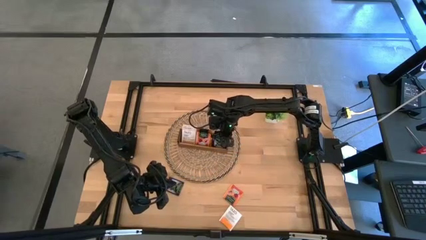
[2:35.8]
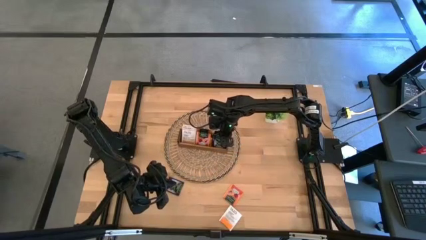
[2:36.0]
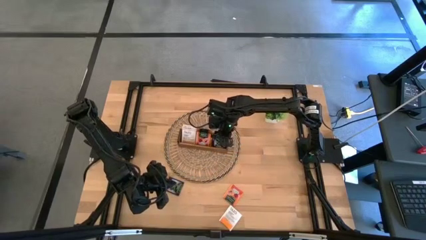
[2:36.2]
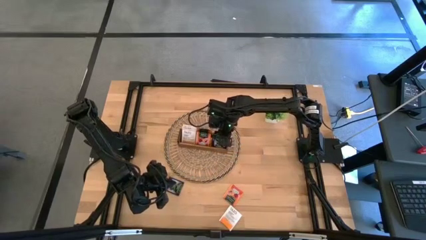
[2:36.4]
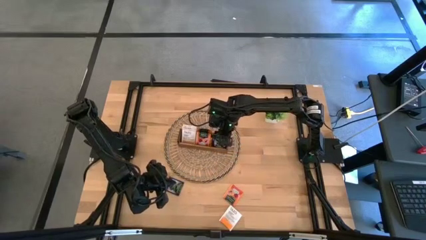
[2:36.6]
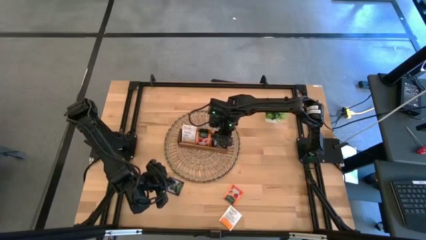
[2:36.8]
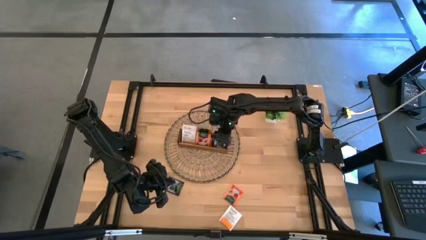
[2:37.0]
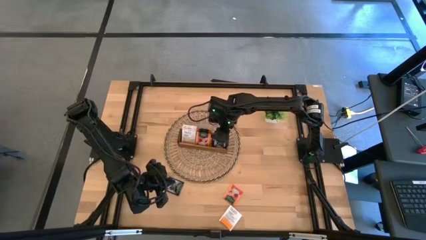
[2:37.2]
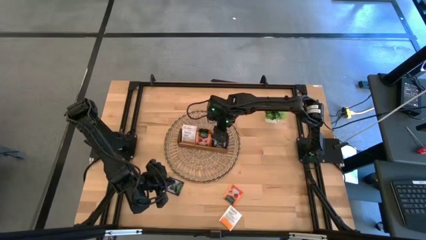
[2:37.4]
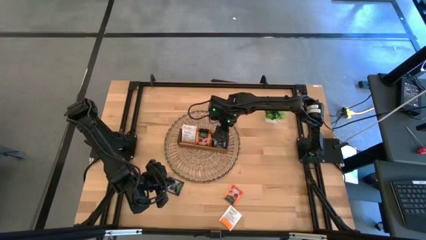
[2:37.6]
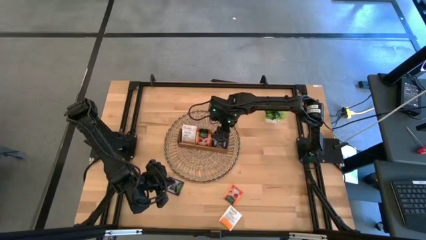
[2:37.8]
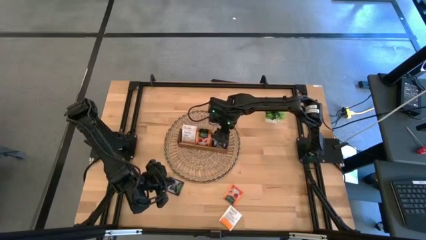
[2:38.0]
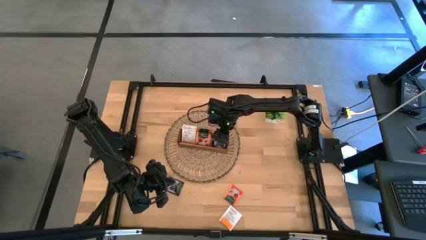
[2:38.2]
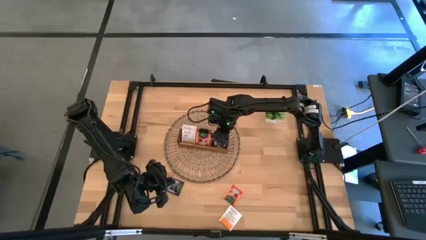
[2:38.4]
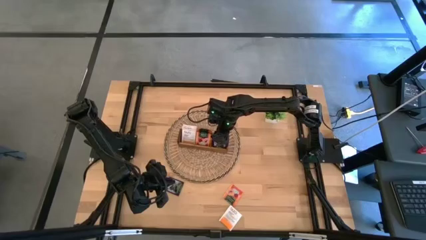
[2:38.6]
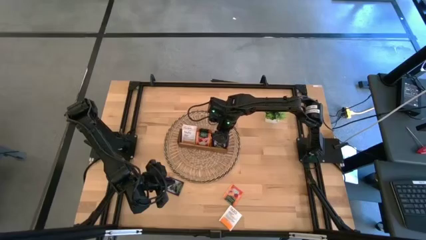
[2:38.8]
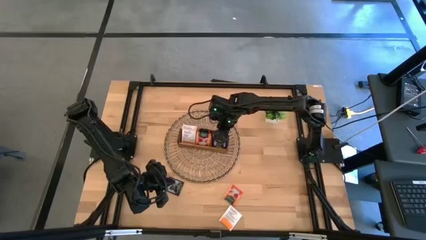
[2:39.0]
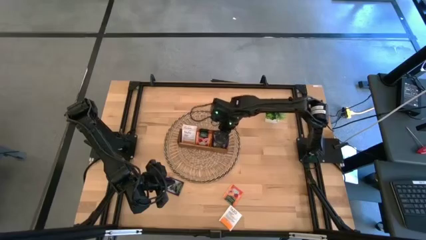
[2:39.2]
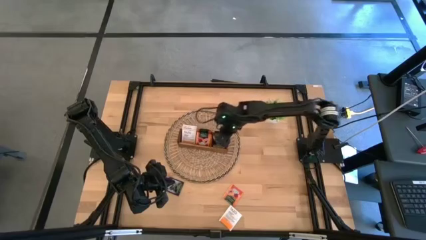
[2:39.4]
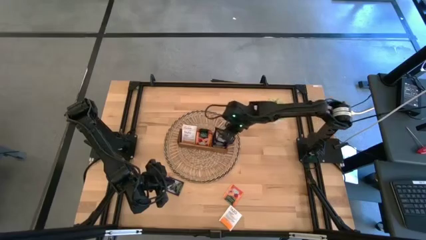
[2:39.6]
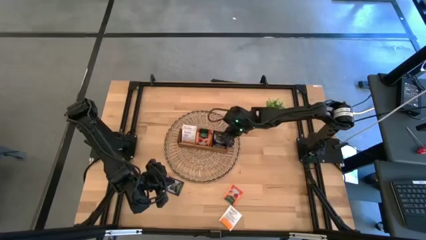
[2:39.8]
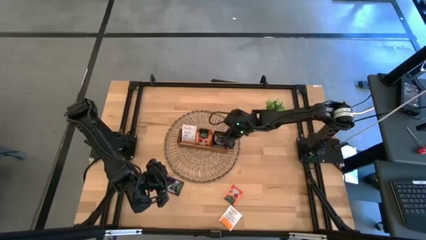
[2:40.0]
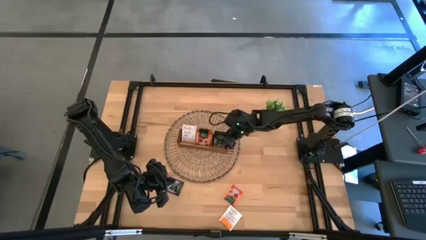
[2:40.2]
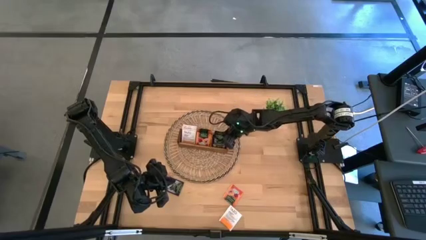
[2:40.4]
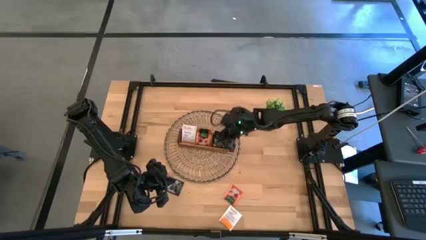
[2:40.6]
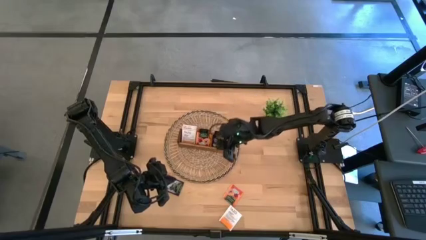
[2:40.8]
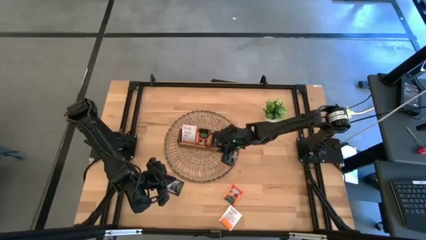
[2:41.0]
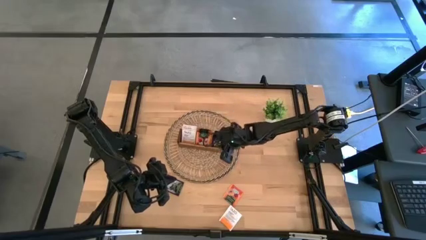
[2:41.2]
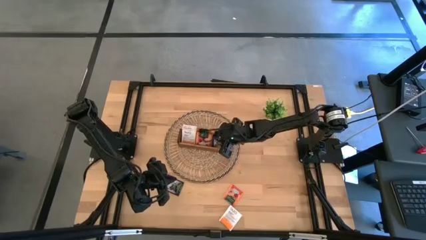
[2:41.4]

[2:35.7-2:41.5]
Task: Pick & Place Tea
Adjust the purple tea bags in the wooden organizer

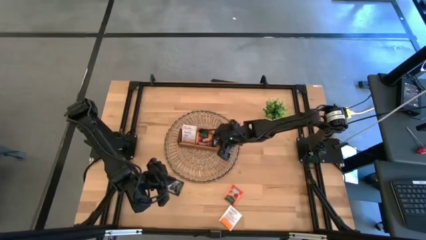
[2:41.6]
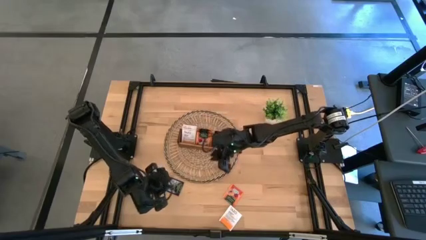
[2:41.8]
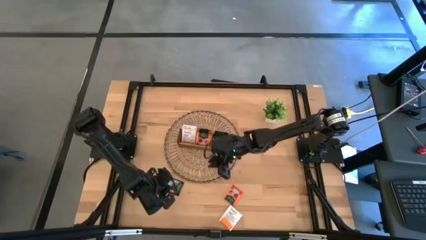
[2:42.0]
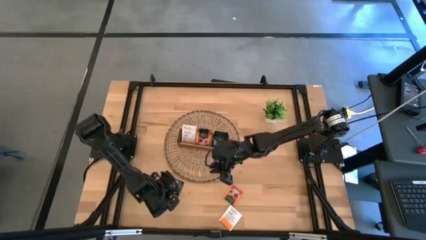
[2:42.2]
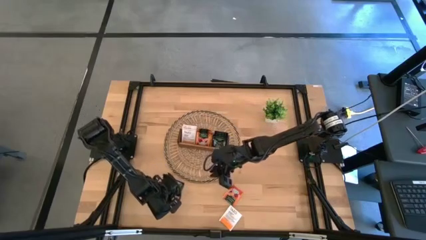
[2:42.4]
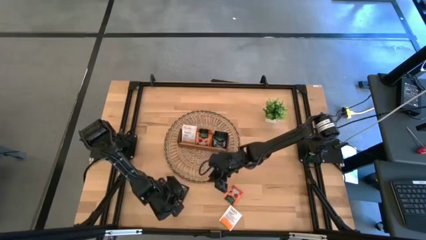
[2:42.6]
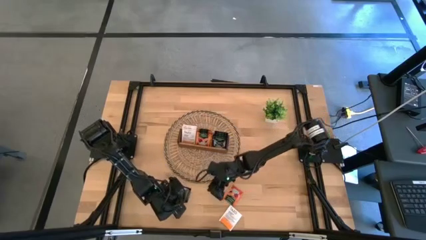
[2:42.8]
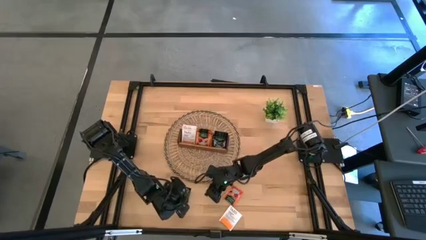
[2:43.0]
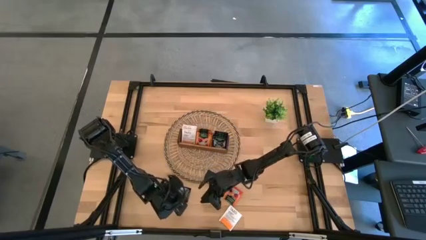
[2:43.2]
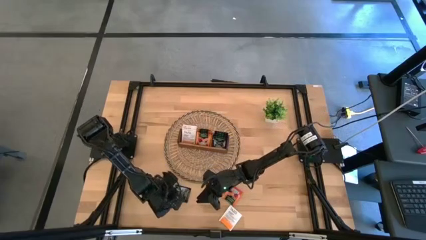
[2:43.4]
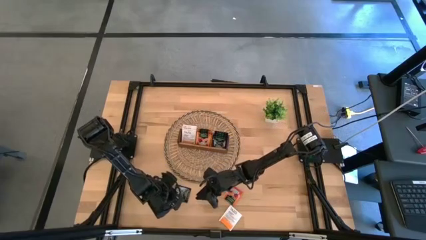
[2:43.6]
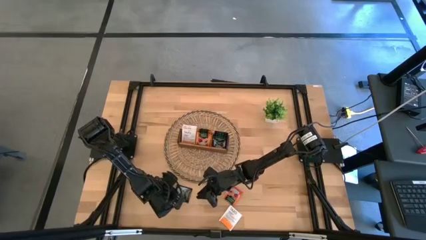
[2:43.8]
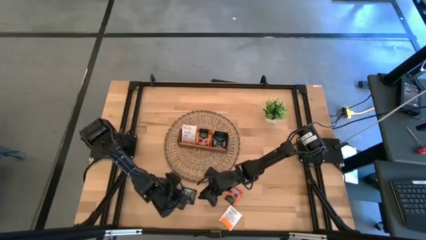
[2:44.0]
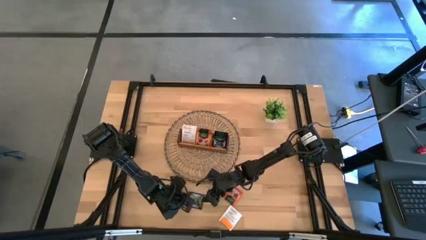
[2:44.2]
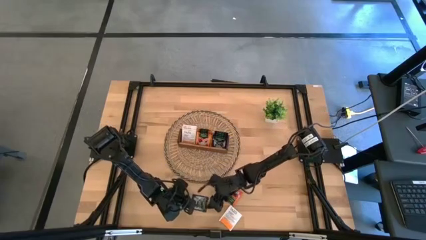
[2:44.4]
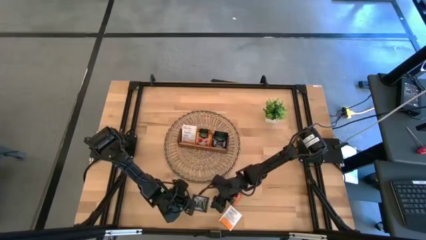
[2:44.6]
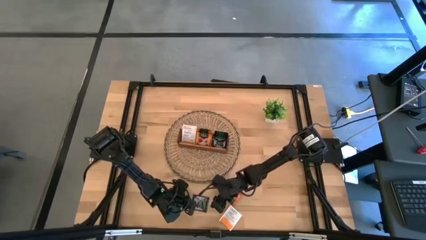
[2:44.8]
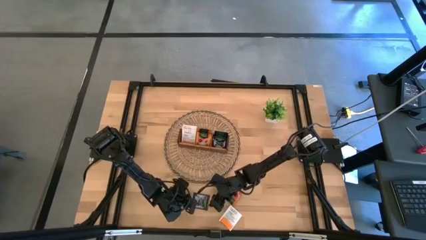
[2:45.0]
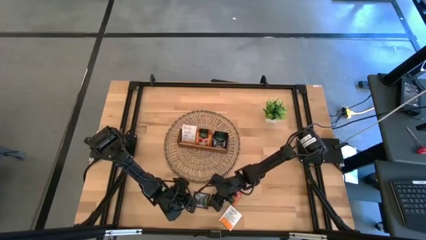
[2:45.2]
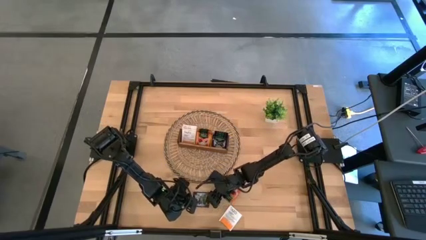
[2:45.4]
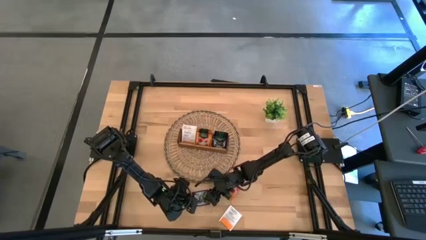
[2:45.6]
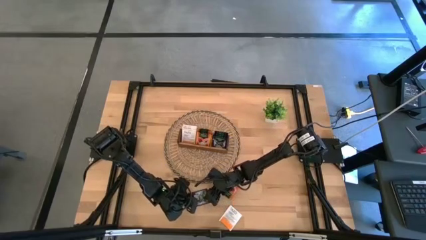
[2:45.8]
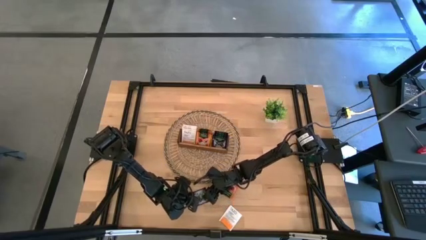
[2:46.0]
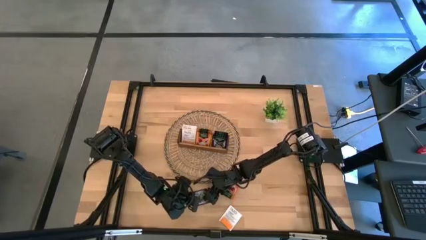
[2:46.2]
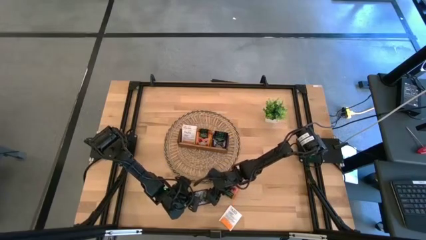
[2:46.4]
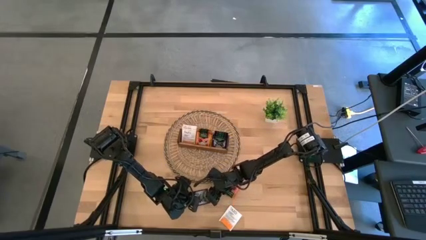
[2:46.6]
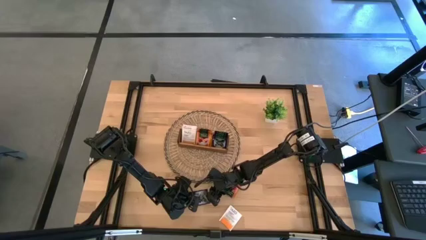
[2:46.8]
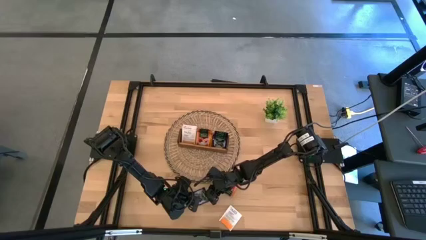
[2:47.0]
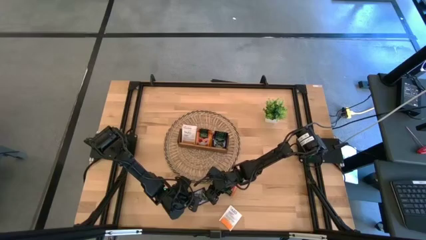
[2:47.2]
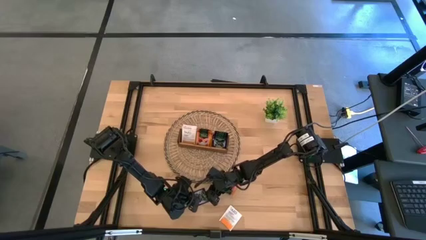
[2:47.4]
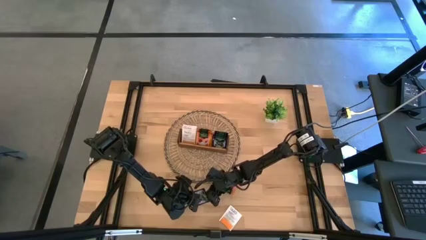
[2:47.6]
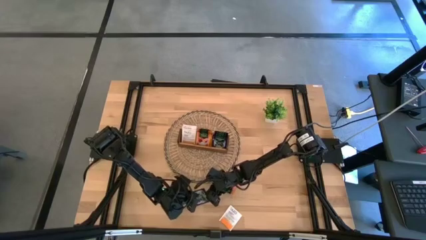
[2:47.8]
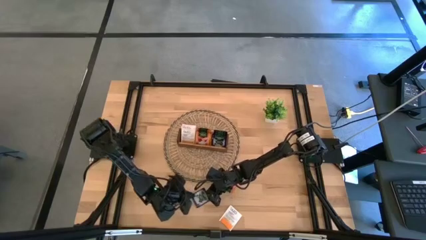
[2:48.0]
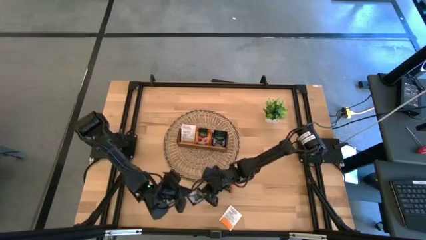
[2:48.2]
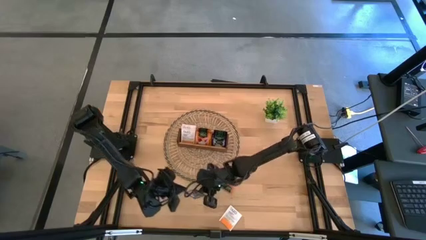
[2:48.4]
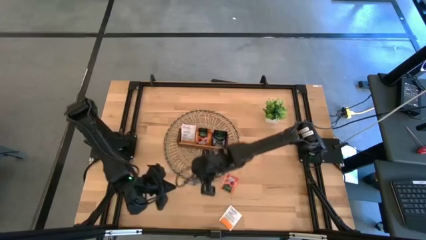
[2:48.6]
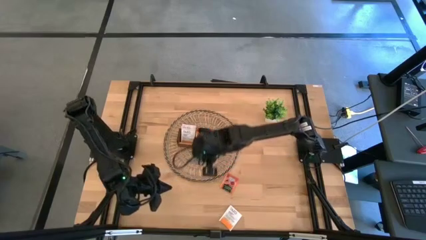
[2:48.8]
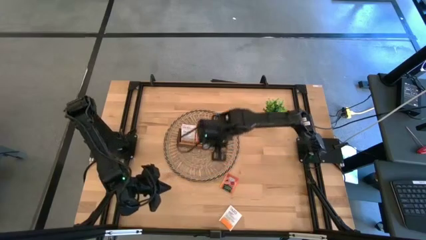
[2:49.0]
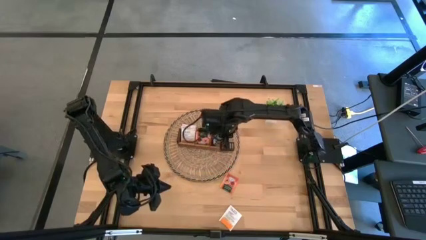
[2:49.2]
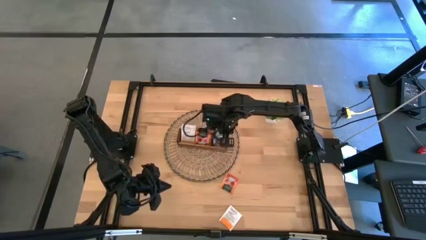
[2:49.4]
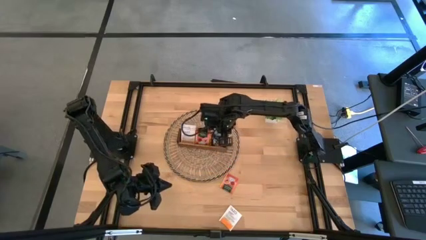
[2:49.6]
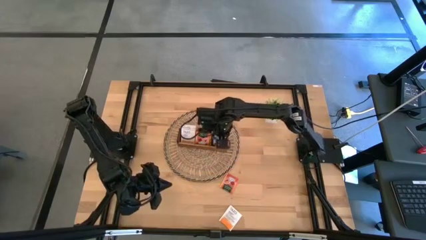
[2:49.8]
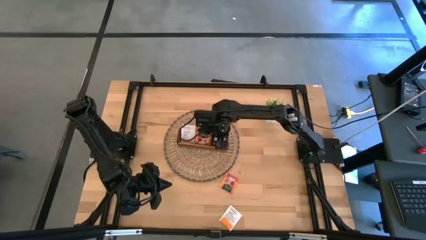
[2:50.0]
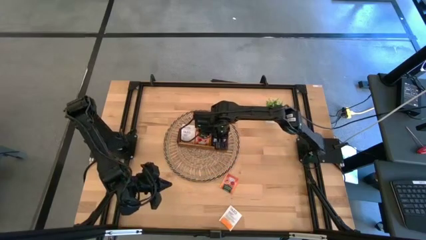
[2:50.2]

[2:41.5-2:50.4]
Put the purple tea bag into the right section of the wooden organizer
